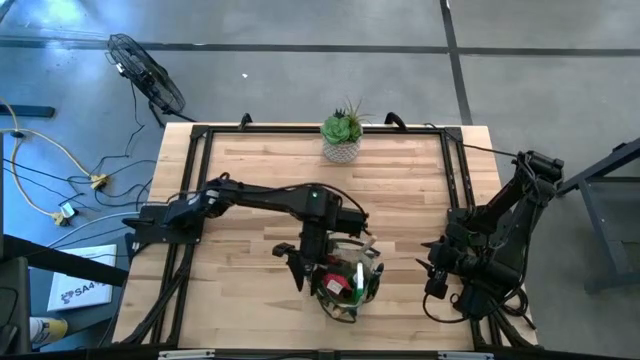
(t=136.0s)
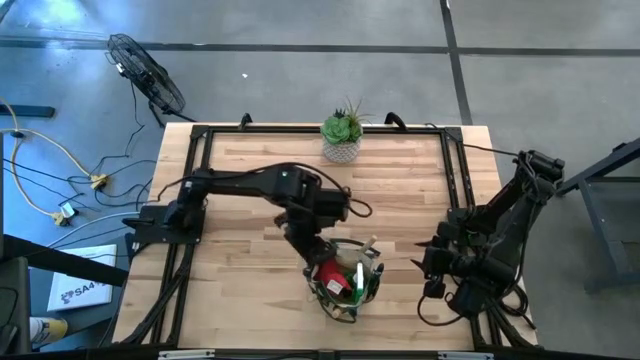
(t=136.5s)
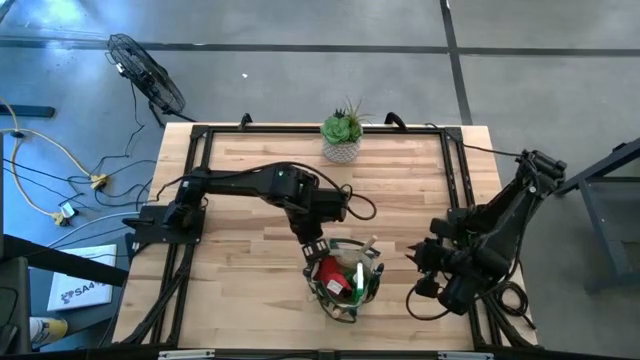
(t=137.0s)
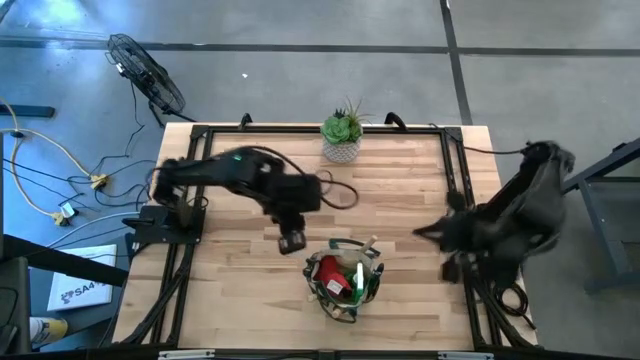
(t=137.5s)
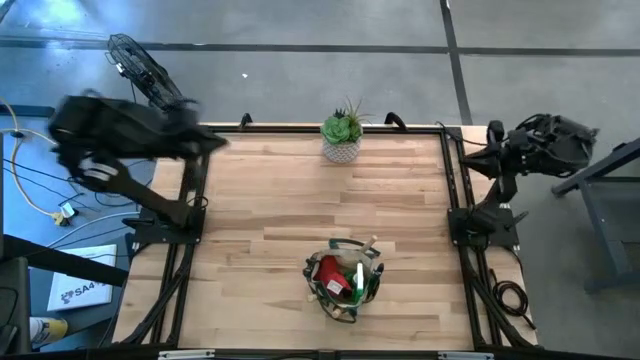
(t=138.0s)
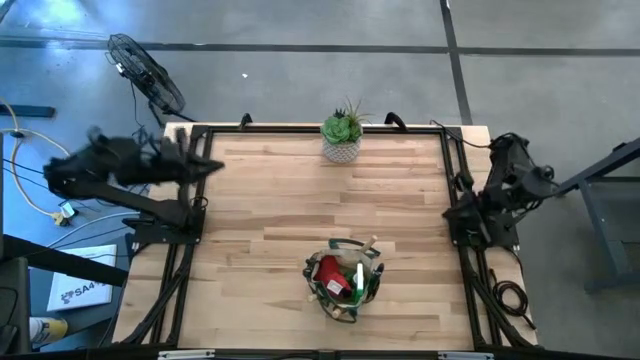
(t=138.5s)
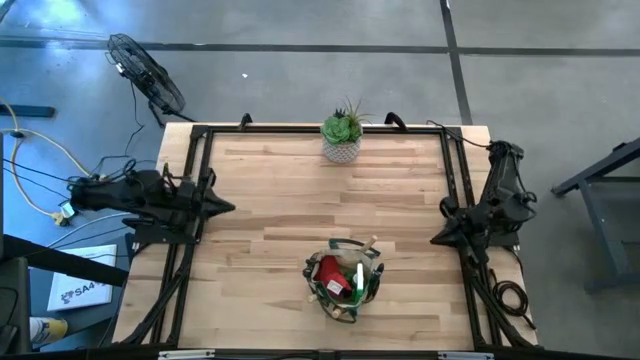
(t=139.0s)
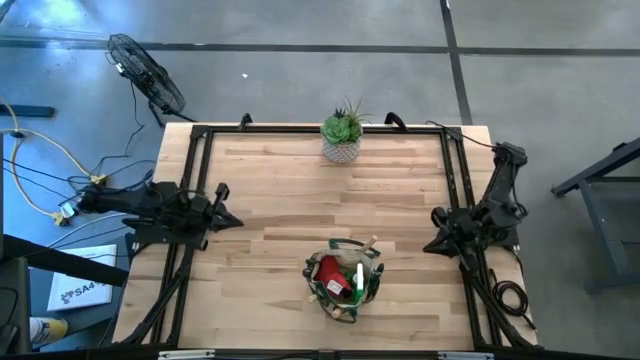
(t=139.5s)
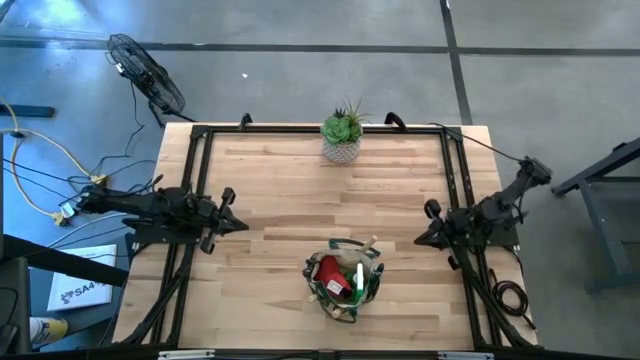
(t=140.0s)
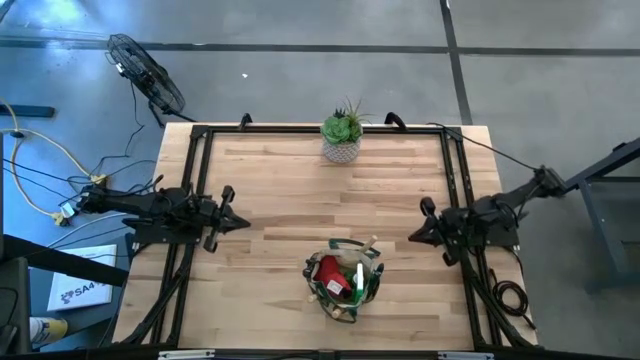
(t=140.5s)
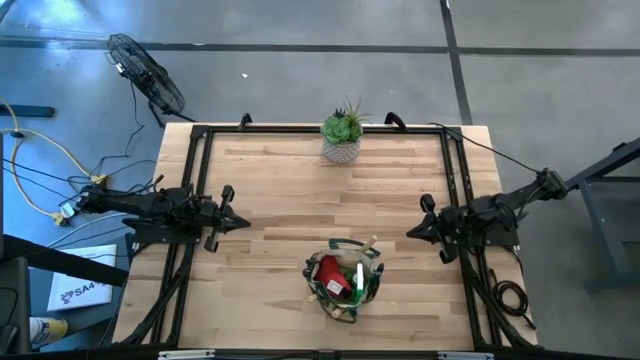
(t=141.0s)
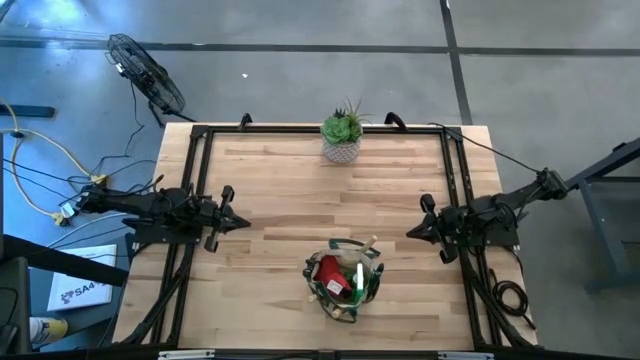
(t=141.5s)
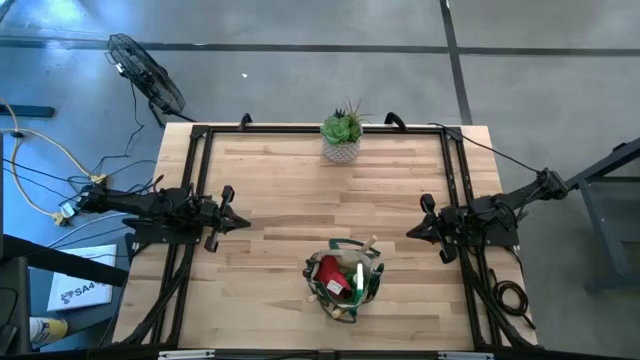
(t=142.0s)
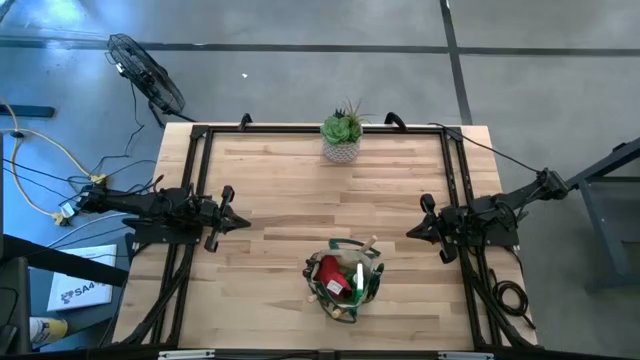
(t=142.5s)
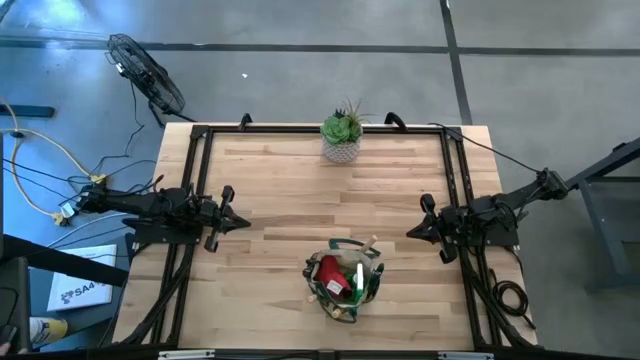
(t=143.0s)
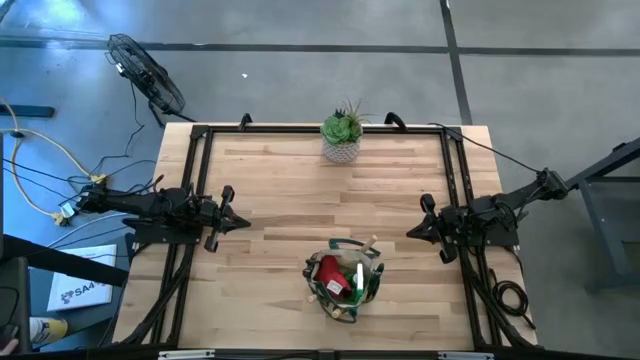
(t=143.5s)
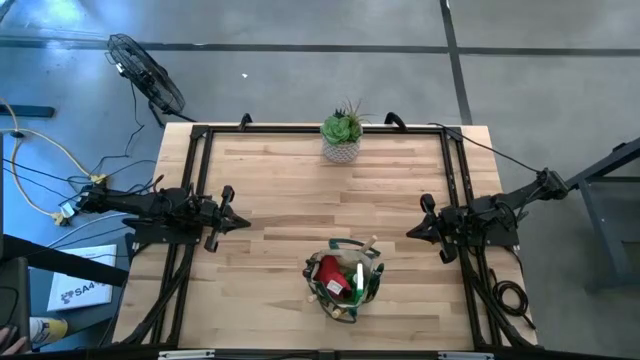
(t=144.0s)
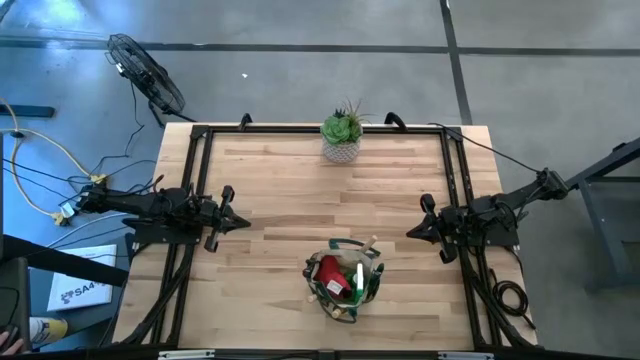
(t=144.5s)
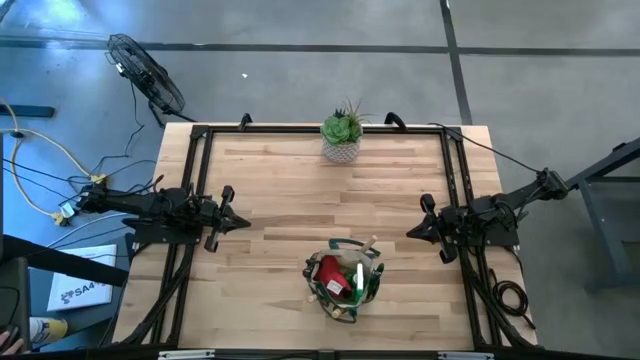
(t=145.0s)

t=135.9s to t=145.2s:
Task: Pick & Place Garden tools in Gardening bag
Return to Home Position

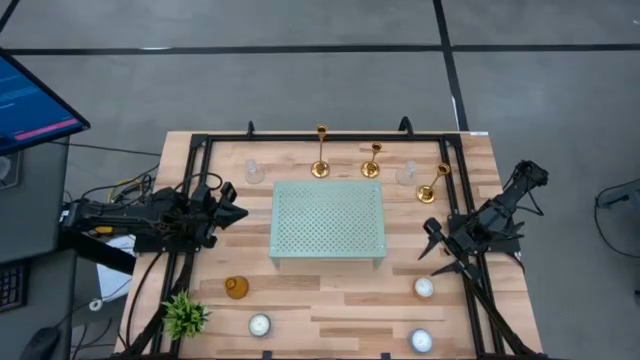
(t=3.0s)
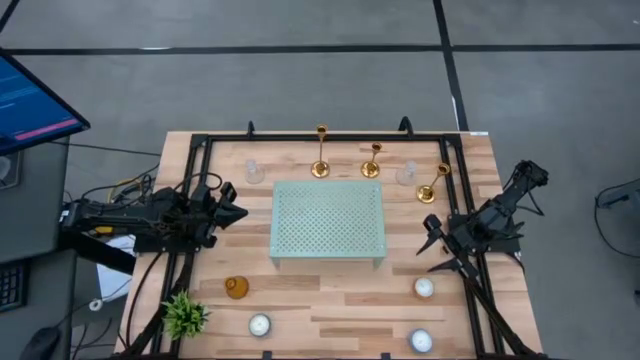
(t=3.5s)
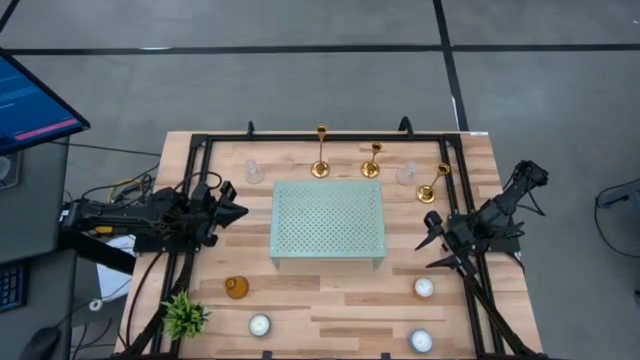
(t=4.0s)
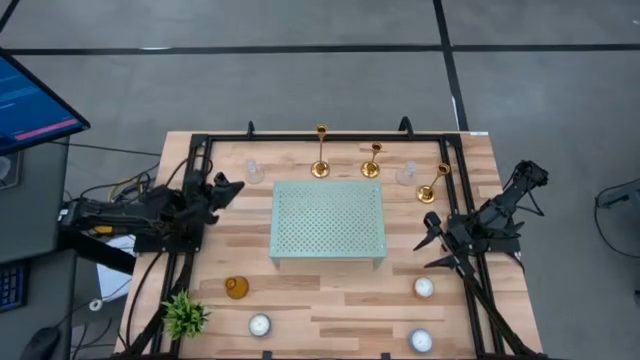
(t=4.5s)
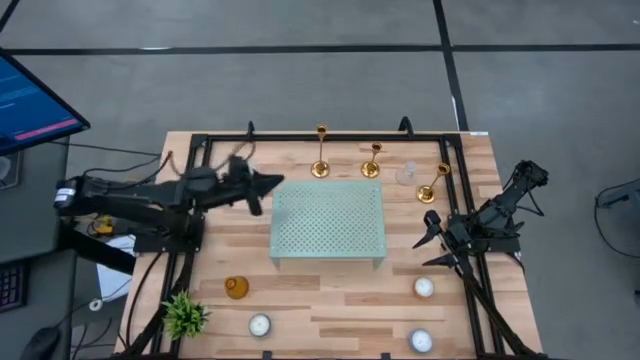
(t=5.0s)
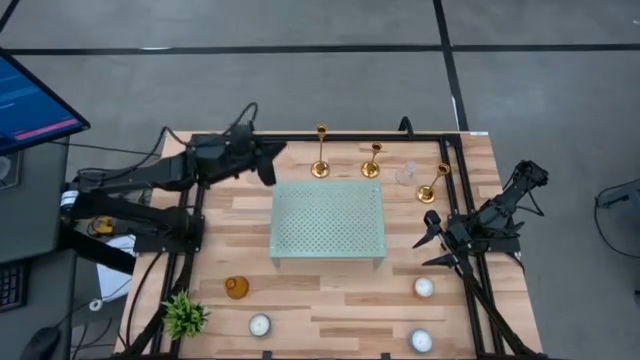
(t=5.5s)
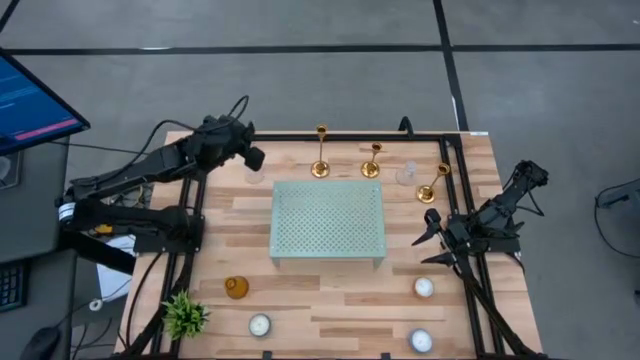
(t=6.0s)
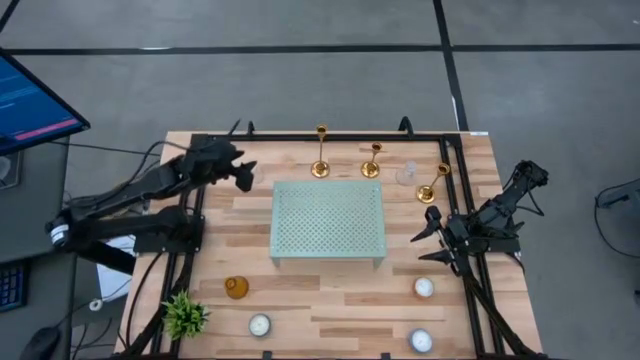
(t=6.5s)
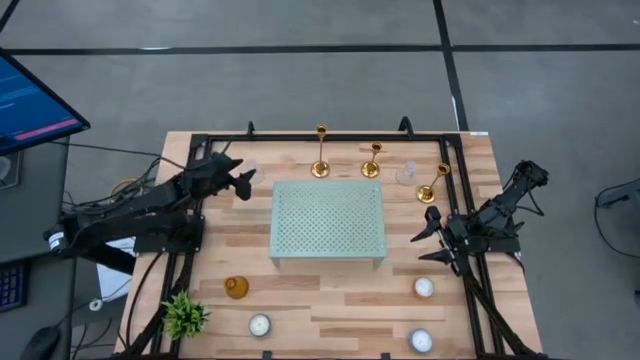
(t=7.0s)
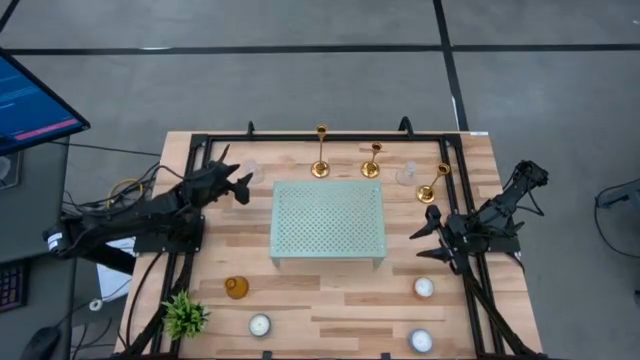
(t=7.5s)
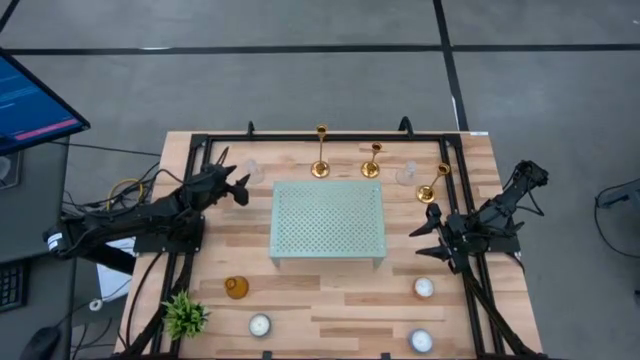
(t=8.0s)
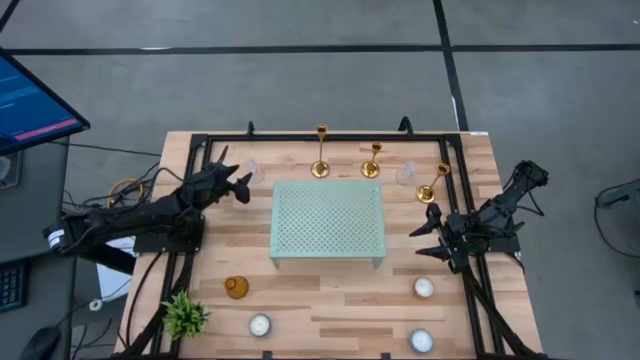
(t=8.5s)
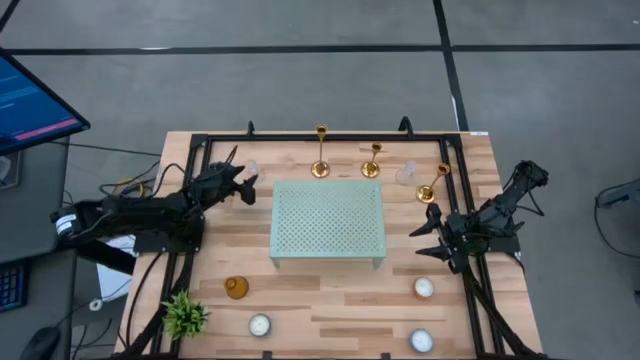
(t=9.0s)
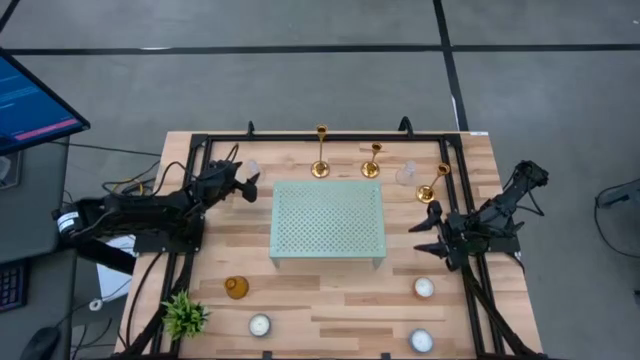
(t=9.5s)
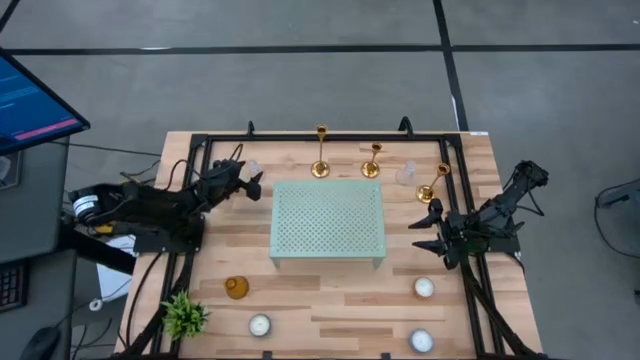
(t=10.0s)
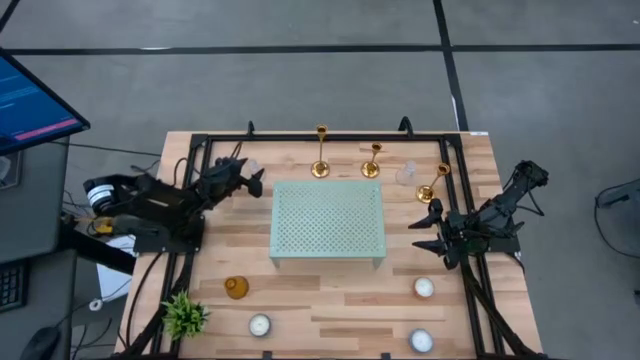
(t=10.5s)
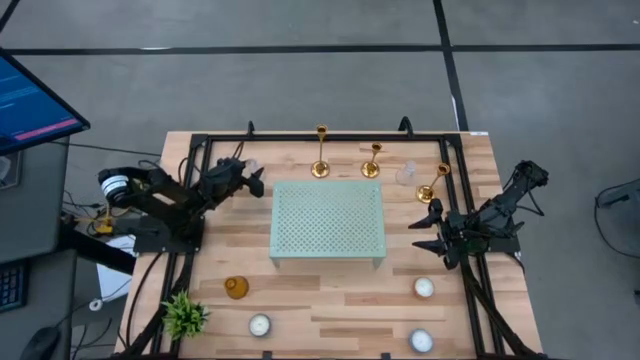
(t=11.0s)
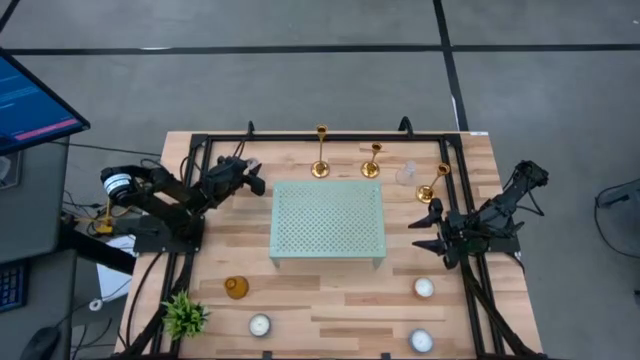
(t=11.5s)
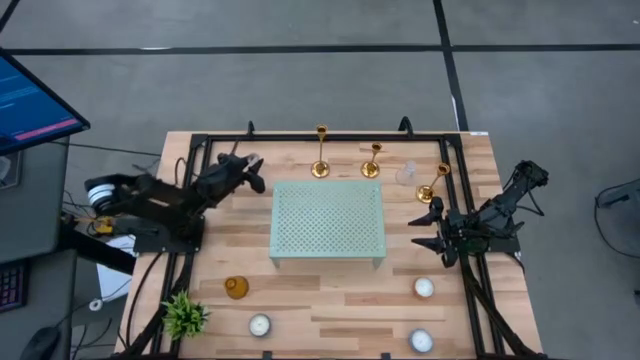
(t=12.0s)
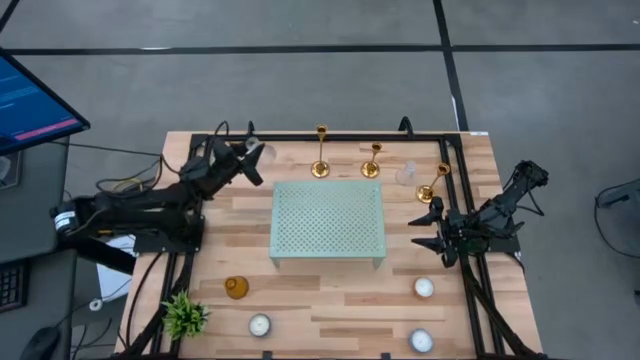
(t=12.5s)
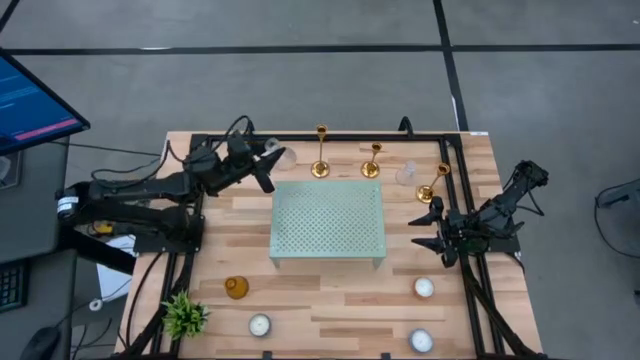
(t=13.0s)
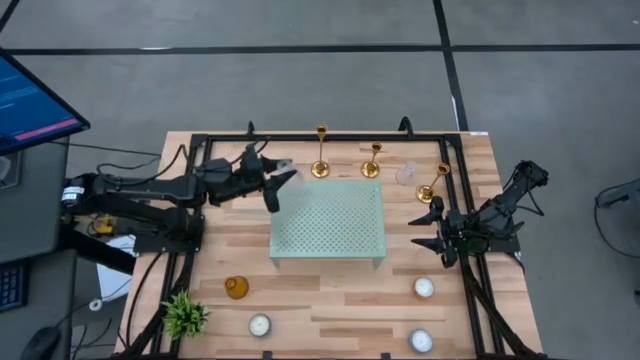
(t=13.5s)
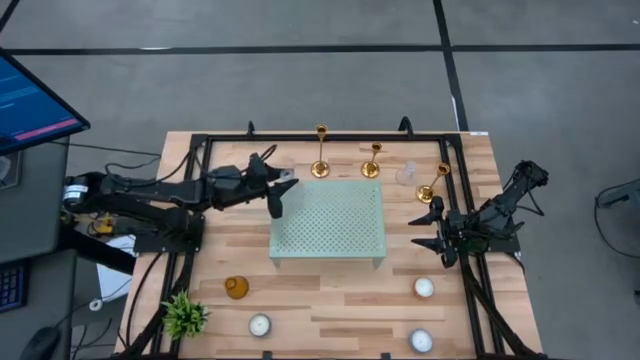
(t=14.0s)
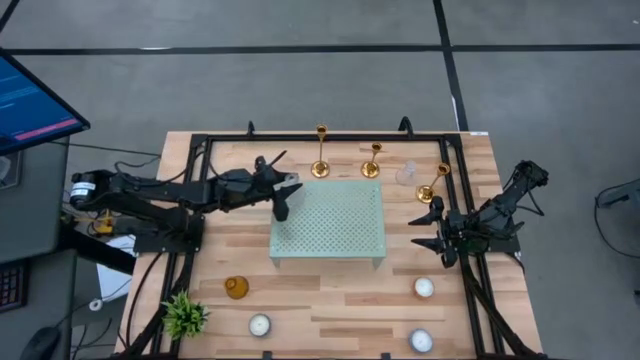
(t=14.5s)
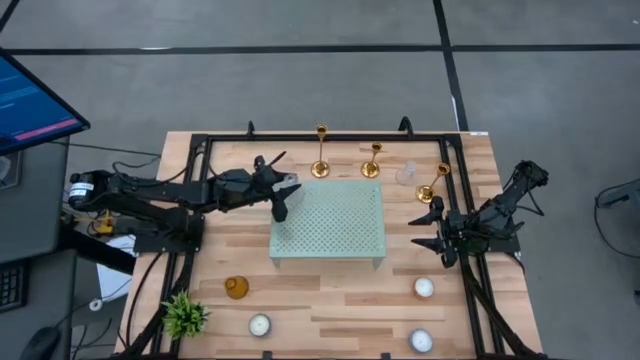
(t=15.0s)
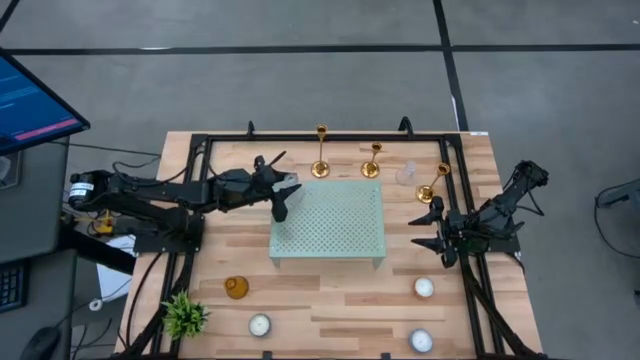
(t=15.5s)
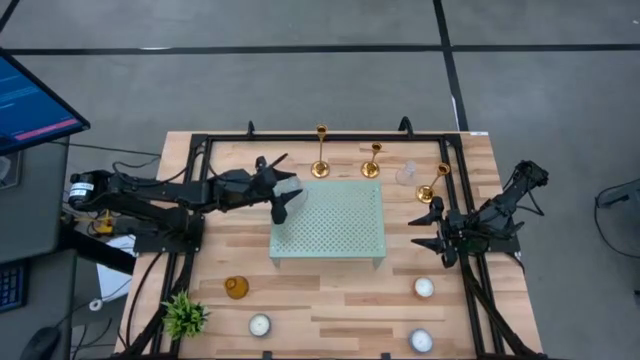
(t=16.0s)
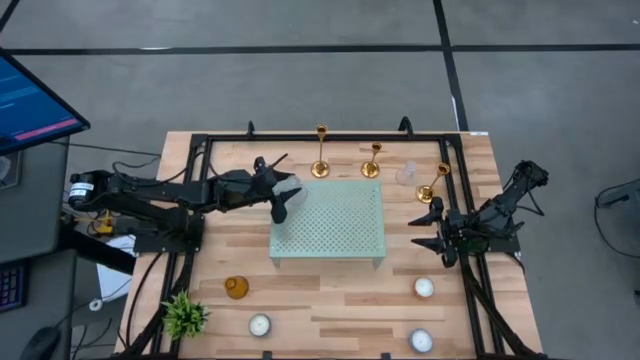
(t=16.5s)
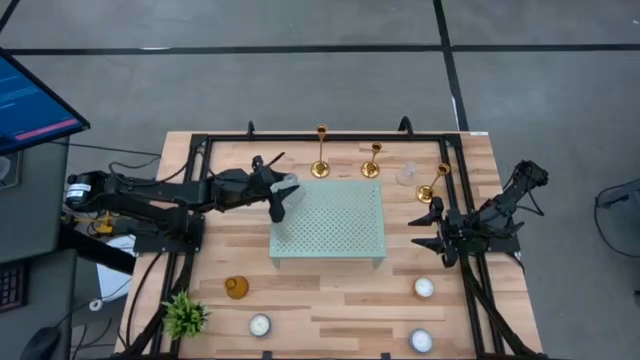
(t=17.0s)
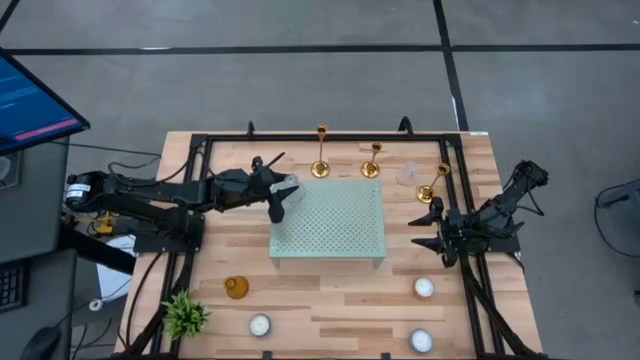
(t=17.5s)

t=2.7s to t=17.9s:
Task: Pick & Place candle stick holders
Put the left transparent glass candle holder on the shelf
